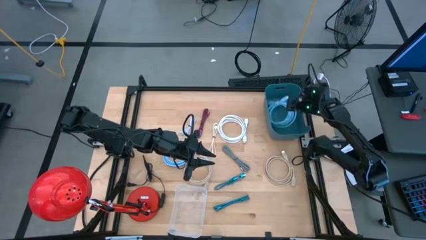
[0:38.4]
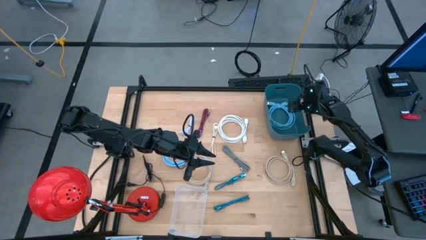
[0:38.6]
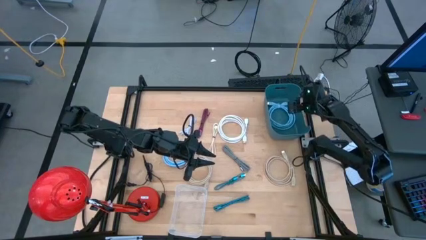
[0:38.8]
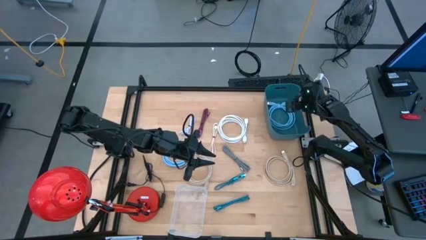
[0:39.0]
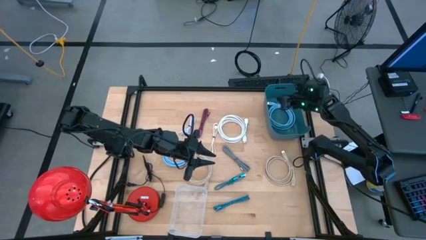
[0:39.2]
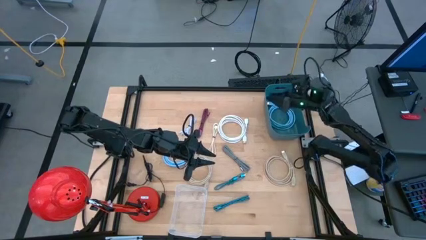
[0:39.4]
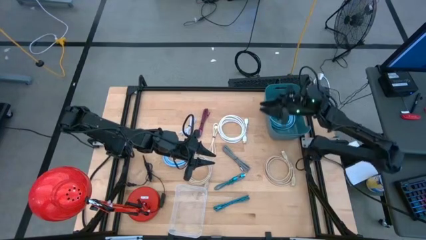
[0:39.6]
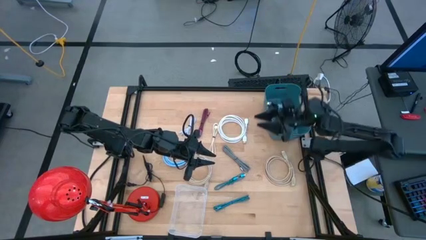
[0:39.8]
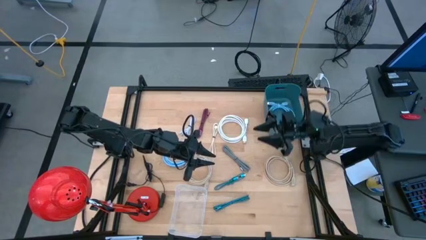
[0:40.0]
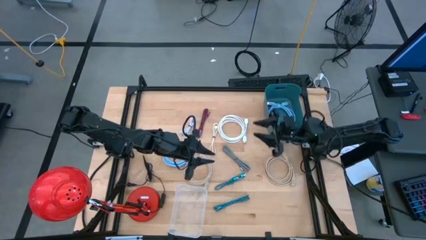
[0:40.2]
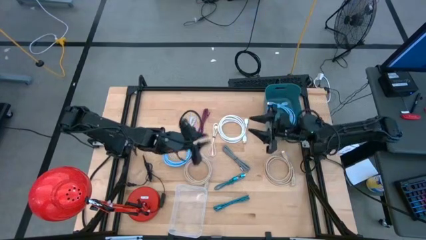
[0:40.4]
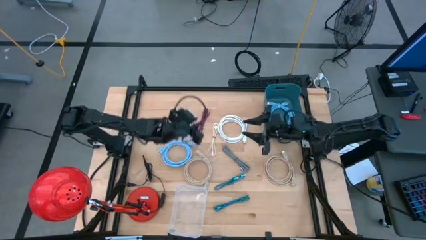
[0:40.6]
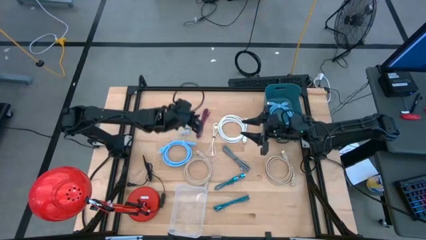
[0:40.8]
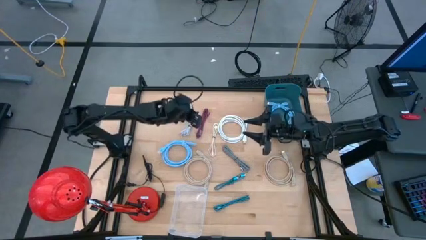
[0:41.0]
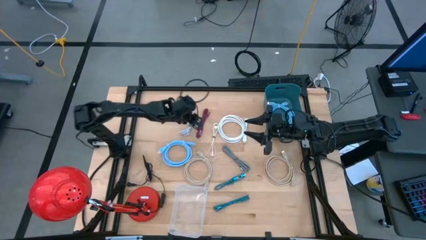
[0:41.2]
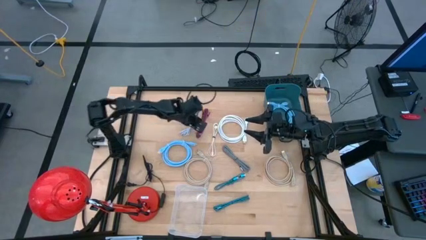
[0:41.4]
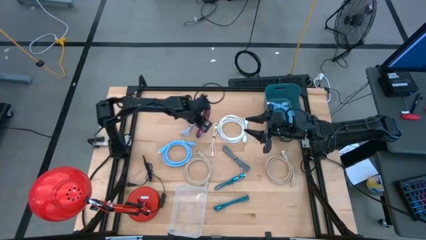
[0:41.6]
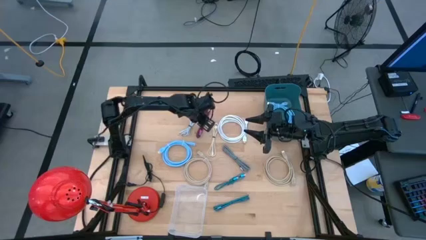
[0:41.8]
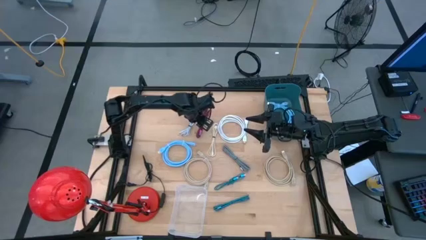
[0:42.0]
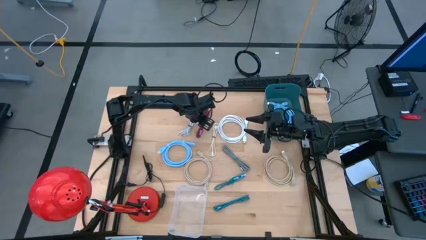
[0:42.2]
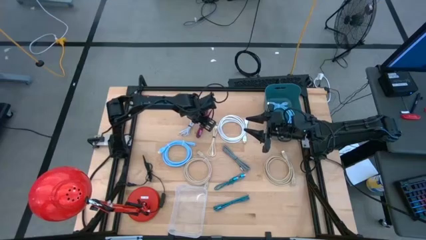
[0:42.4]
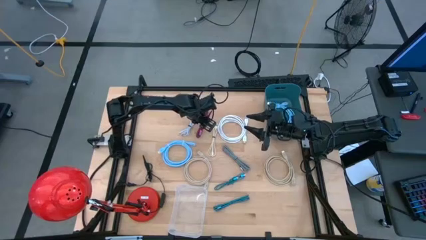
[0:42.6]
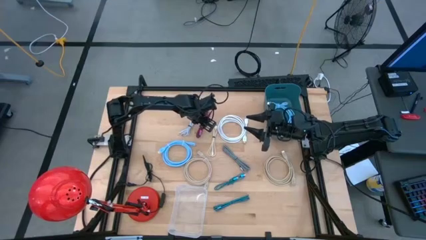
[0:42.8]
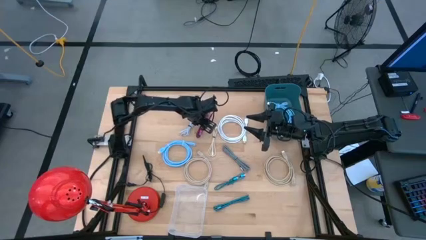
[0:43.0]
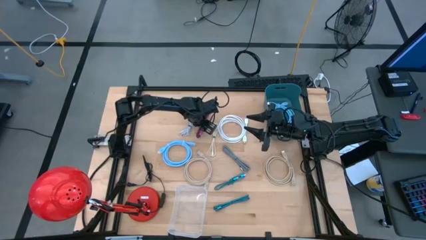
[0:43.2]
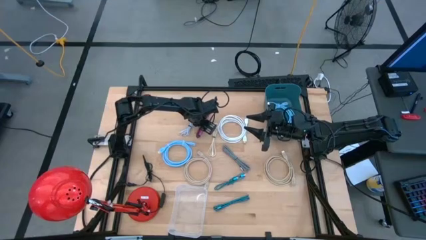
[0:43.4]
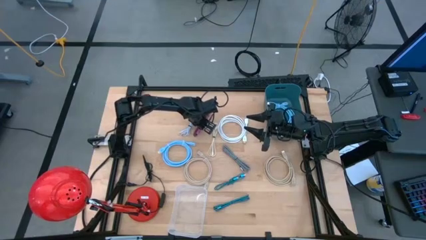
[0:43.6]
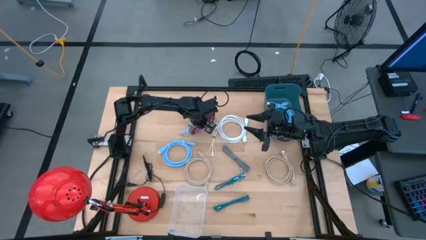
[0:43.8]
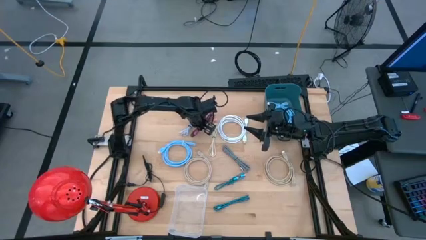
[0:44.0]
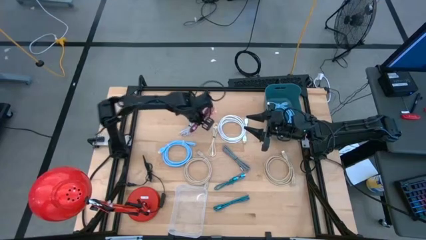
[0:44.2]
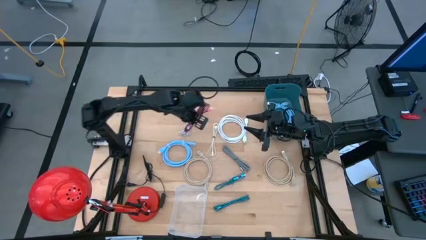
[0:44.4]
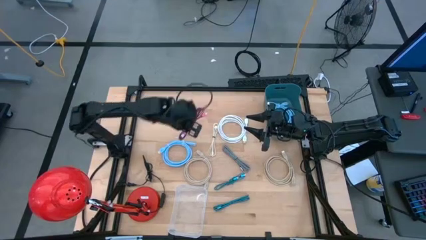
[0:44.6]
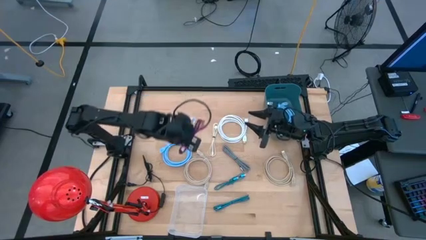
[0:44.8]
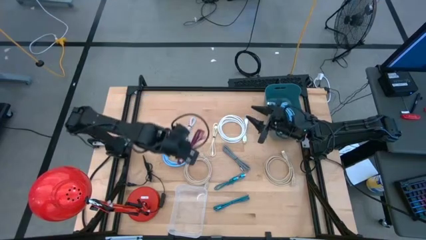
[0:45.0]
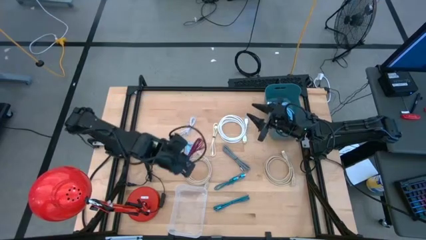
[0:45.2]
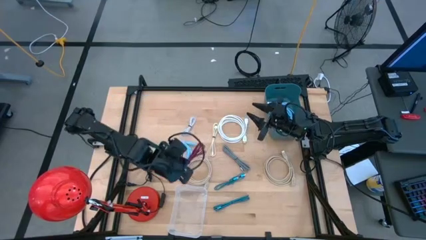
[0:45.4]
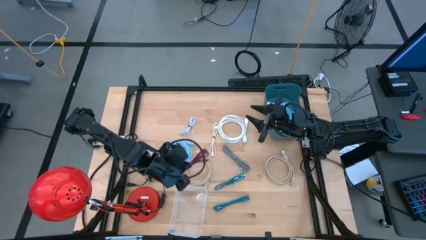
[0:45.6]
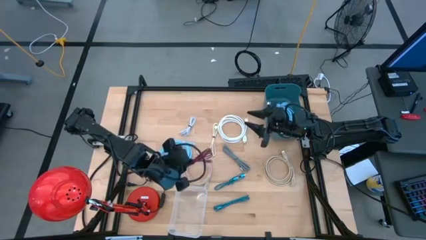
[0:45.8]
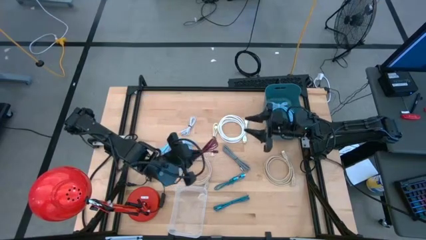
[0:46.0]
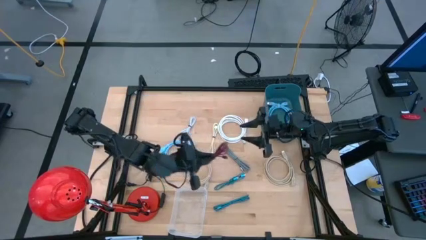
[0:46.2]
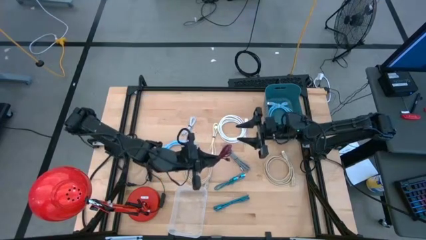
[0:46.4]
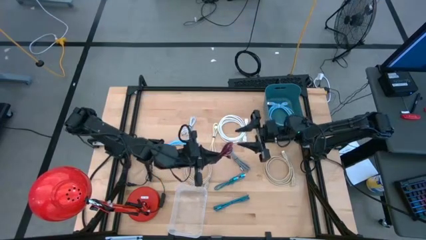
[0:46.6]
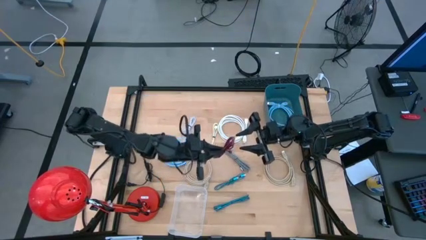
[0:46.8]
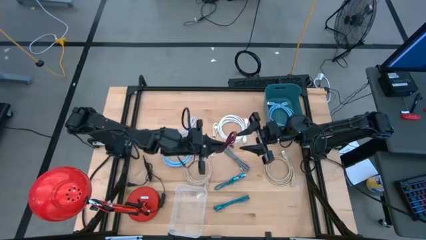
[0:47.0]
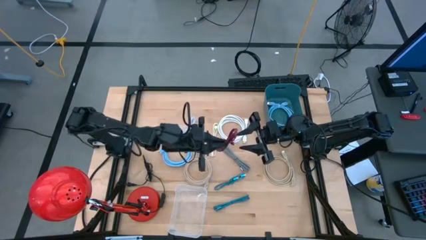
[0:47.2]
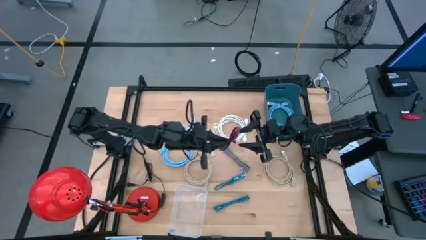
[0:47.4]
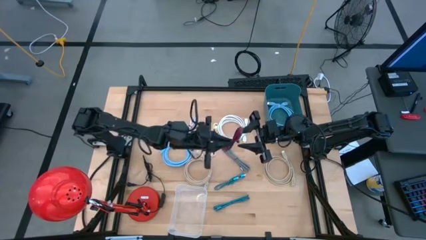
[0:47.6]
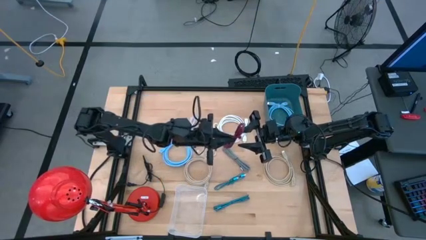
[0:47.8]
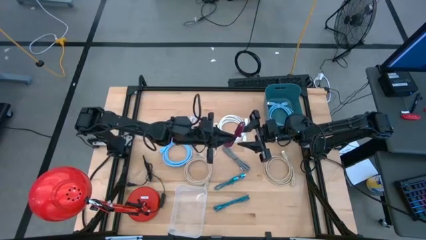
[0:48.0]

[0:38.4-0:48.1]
Task: Pick & Place USB Port
Put the pink charger cable into the transparent bin

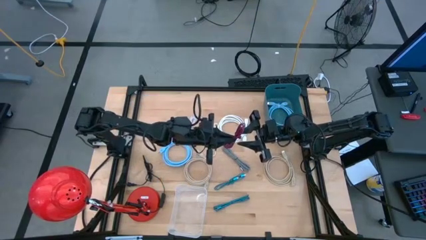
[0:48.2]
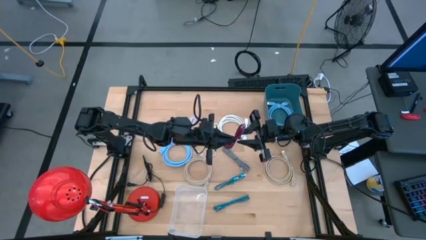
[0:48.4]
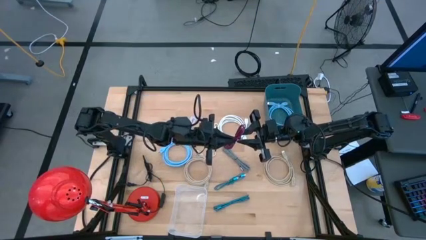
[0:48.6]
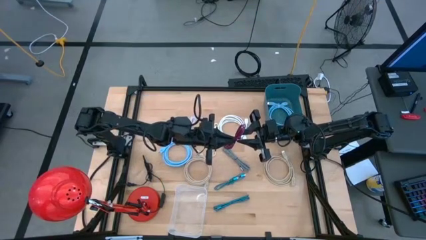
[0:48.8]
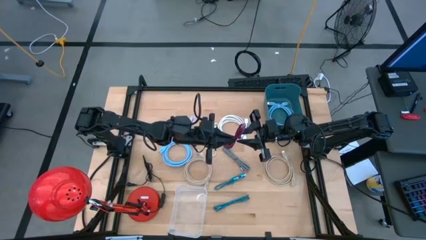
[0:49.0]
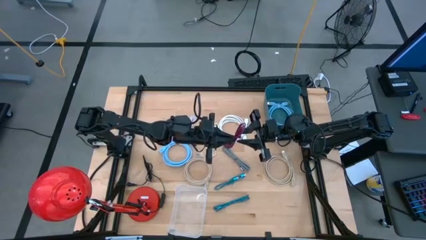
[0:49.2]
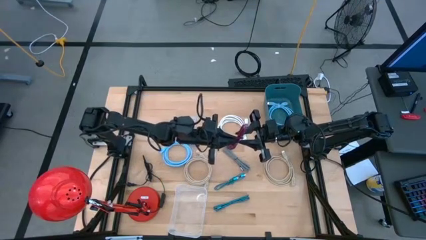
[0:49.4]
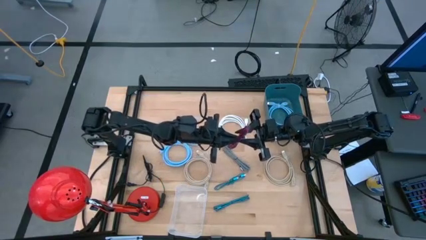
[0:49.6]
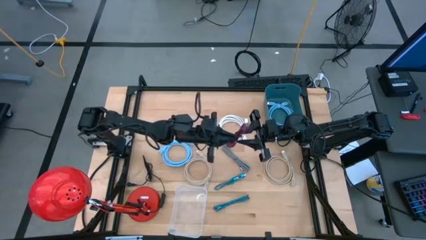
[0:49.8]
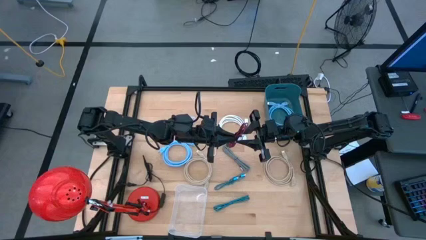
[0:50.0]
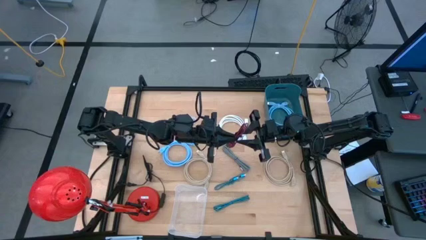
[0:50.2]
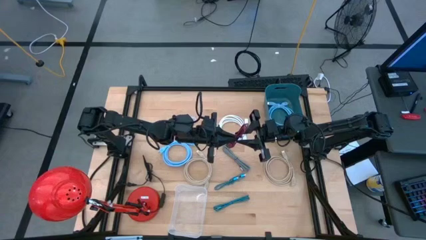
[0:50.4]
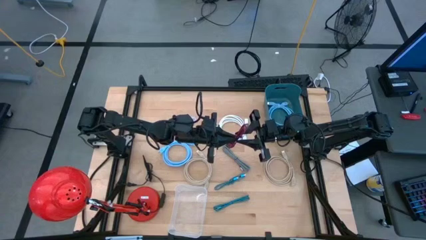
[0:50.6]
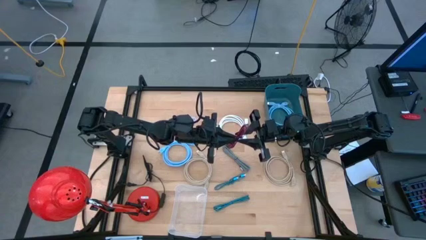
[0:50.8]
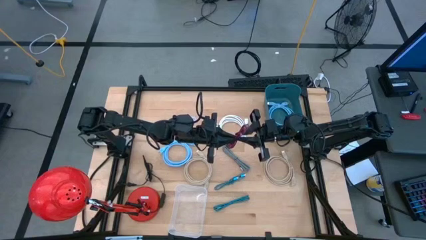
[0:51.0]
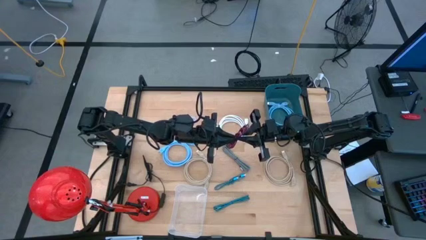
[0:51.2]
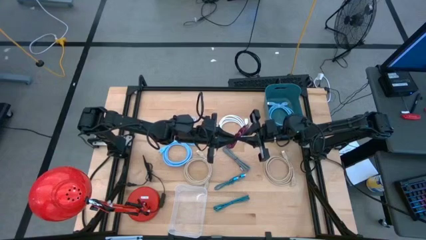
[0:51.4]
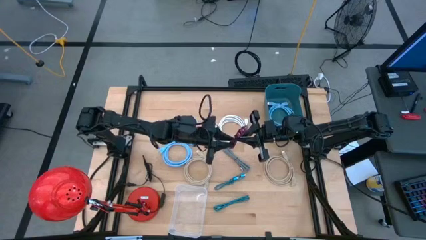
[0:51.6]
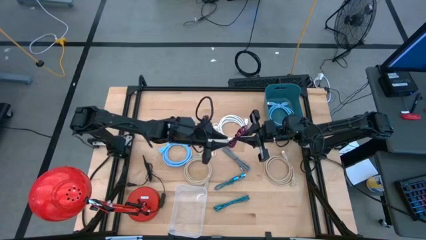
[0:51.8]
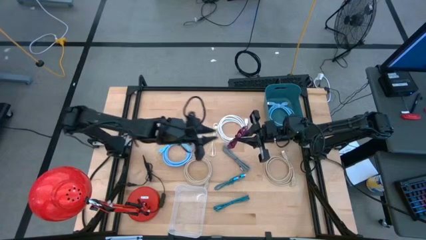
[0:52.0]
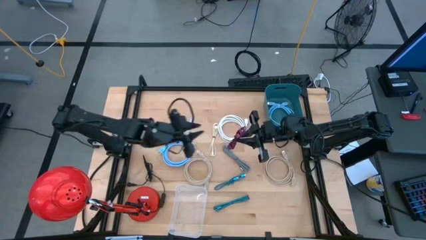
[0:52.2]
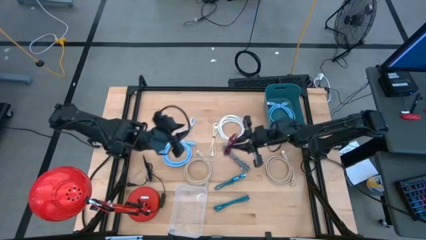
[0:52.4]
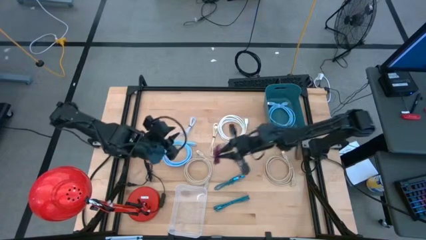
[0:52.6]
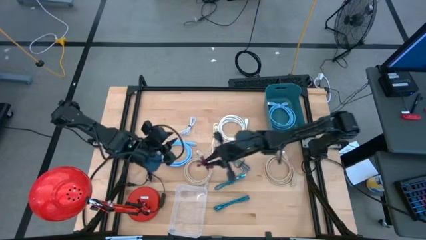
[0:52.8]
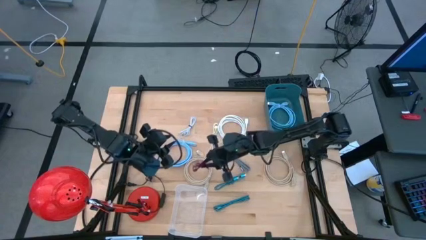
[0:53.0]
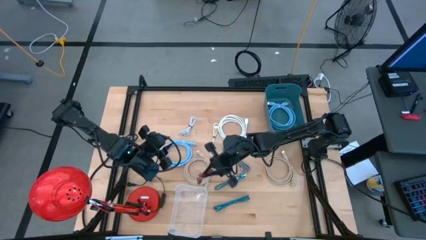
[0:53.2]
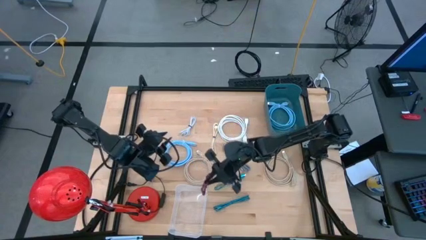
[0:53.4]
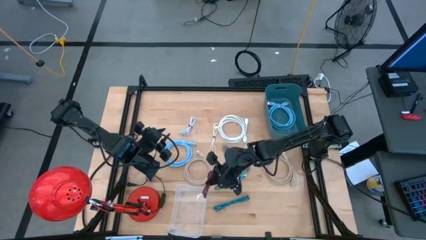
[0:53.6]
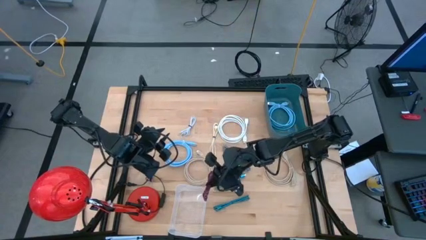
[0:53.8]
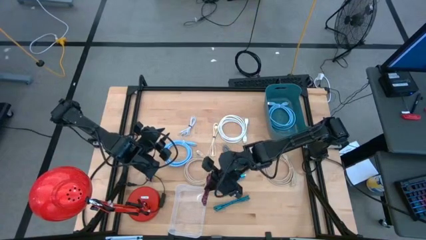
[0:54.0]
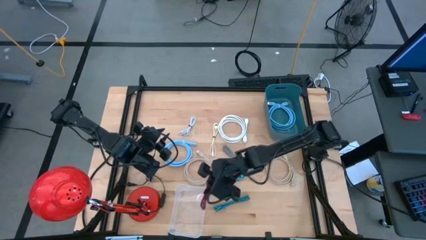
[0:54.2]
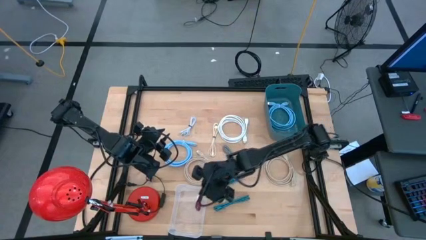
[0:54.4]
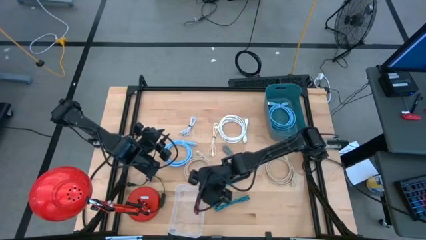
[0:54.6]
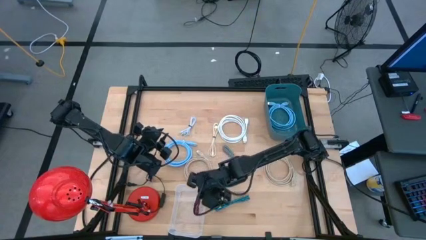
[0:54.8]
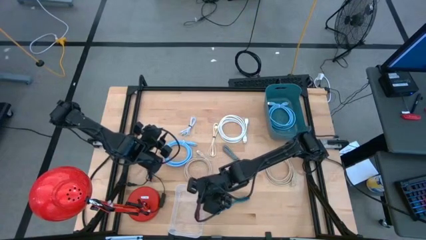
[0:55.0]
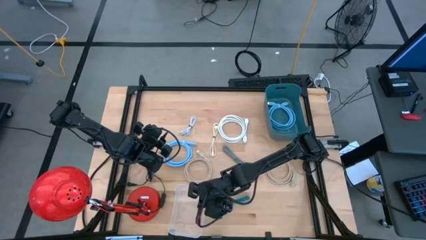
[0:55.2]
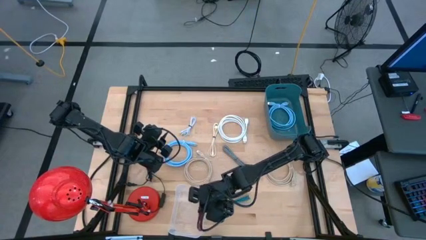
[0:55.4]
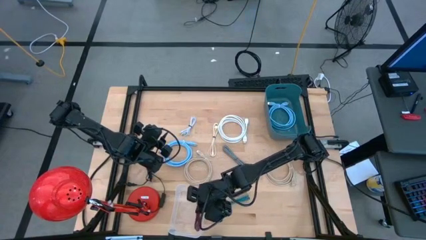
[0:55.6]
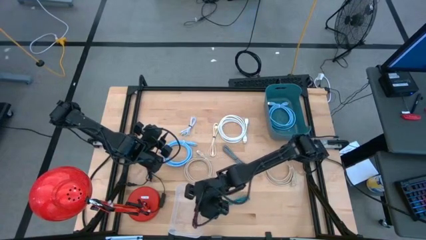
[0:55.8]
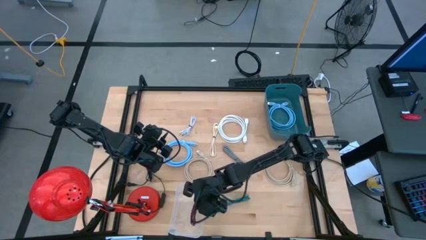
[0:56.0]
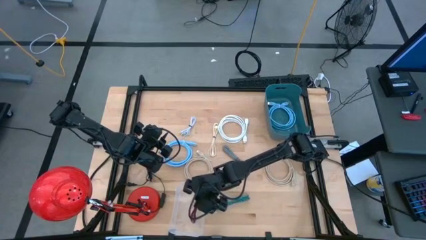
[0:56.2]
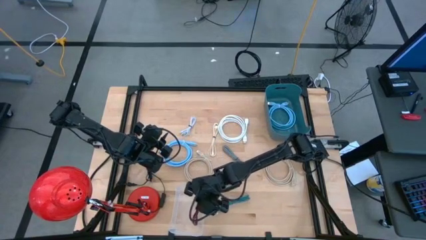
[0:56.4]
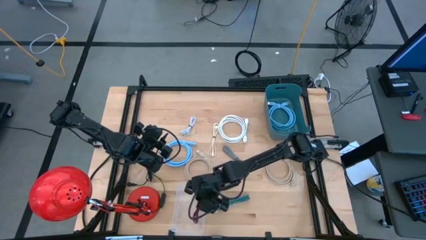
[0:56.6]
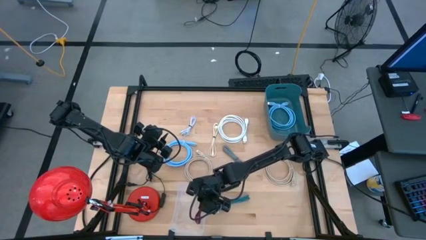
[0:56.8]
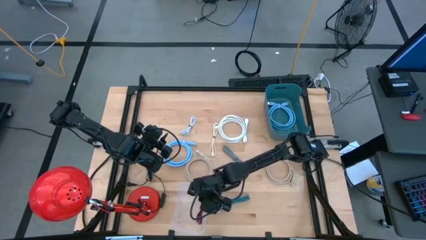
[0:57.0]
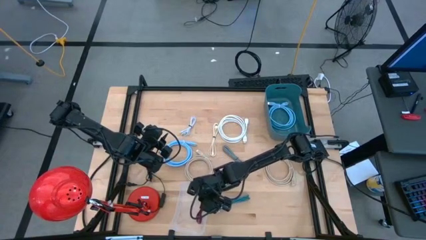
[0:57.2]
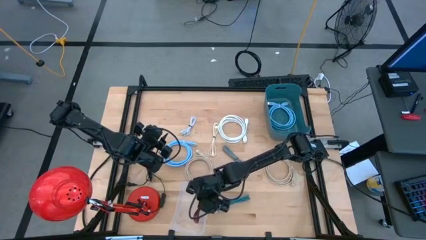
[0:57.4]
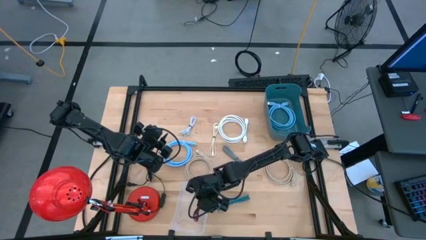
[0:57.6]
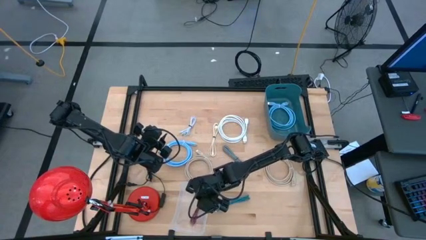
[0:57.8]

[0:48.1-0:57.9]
Put the pink charger cable into the transparent bin
